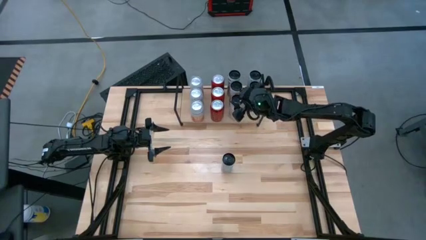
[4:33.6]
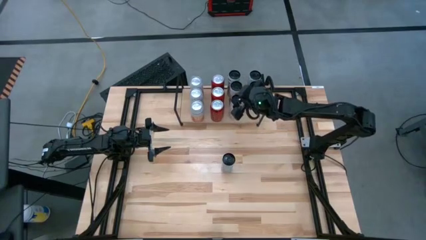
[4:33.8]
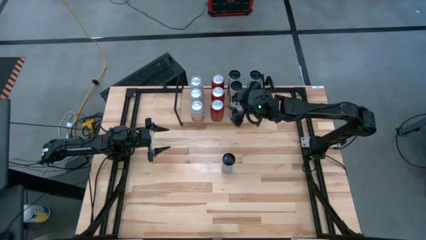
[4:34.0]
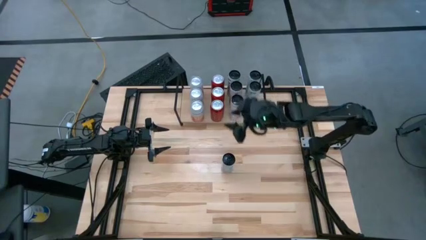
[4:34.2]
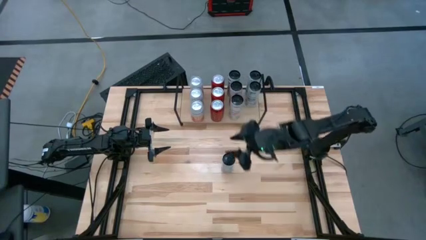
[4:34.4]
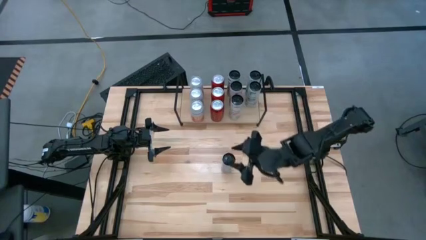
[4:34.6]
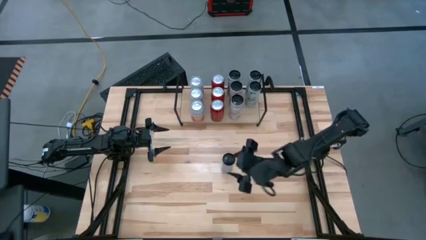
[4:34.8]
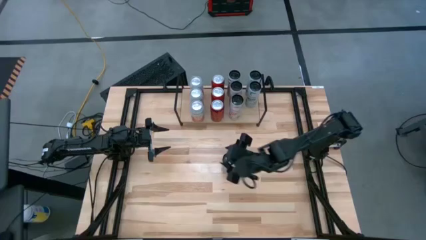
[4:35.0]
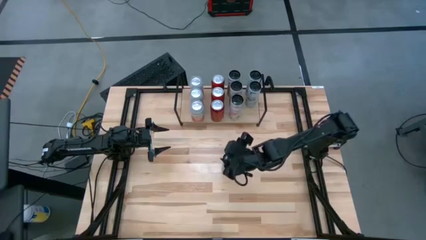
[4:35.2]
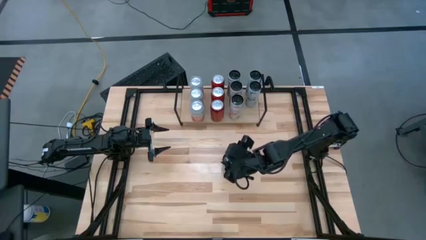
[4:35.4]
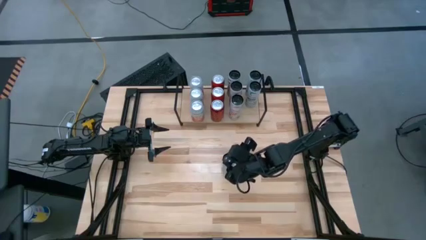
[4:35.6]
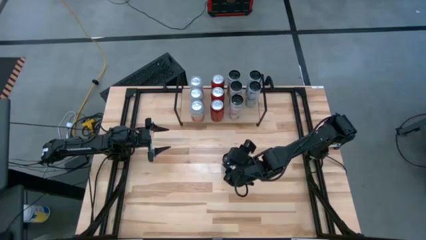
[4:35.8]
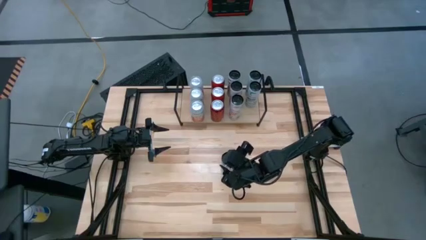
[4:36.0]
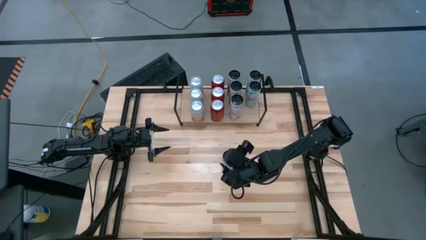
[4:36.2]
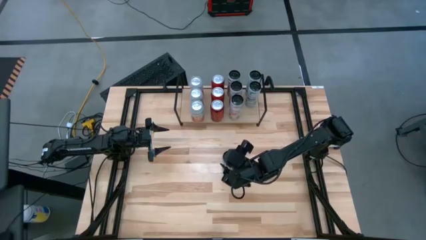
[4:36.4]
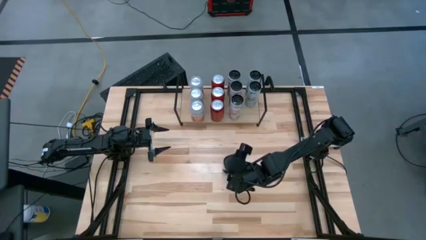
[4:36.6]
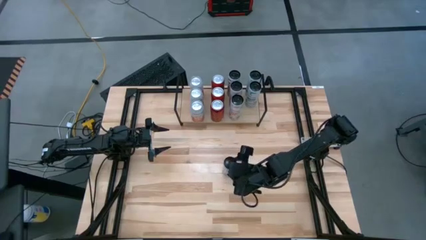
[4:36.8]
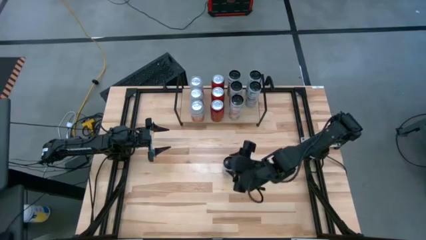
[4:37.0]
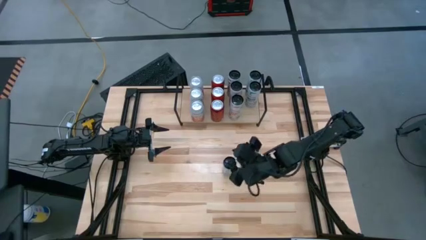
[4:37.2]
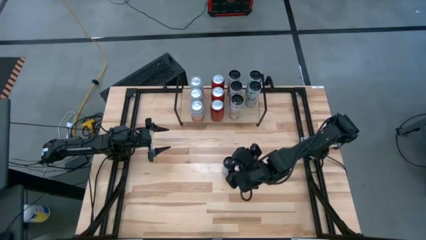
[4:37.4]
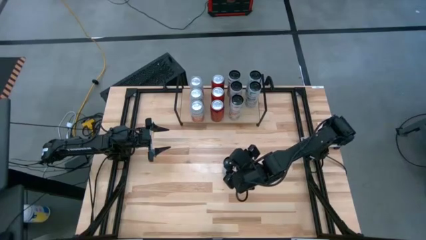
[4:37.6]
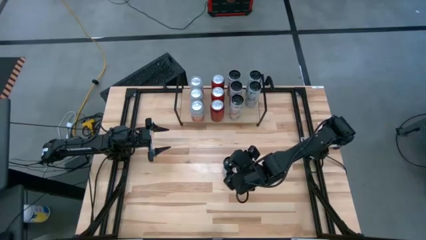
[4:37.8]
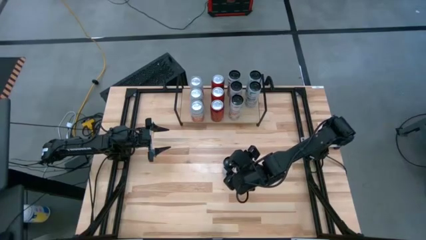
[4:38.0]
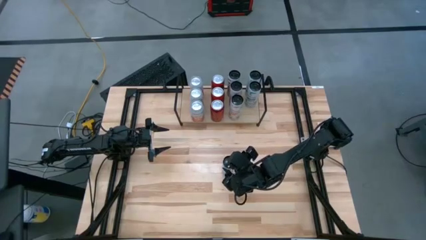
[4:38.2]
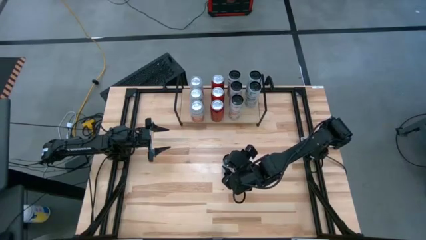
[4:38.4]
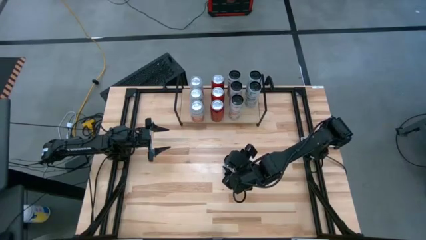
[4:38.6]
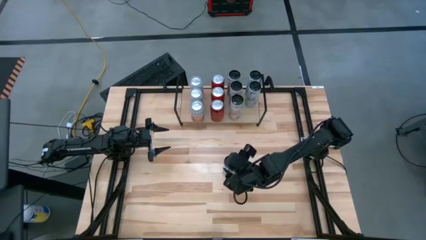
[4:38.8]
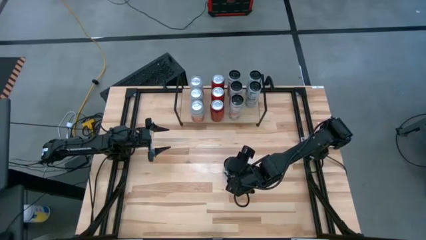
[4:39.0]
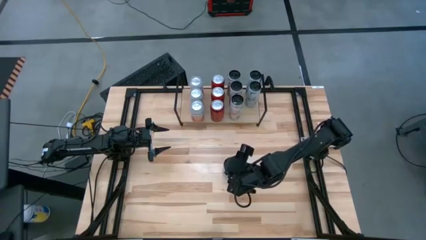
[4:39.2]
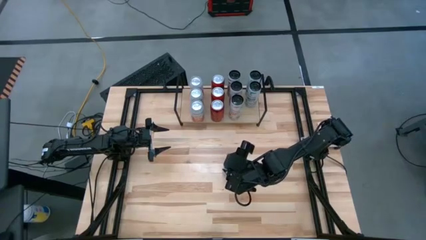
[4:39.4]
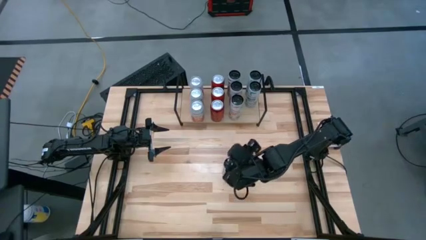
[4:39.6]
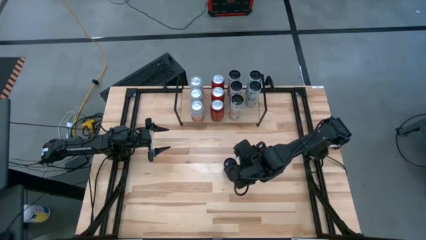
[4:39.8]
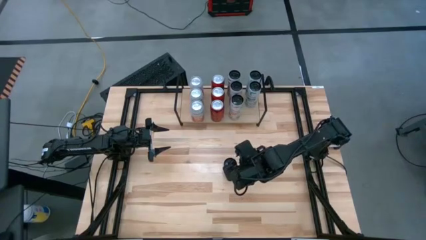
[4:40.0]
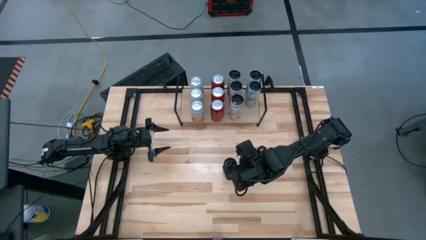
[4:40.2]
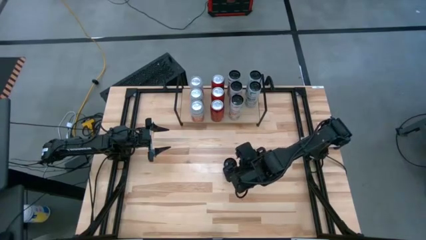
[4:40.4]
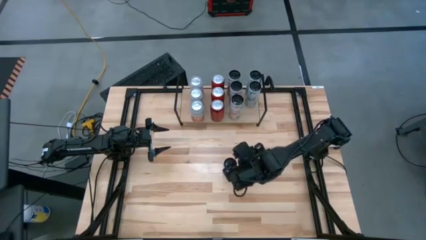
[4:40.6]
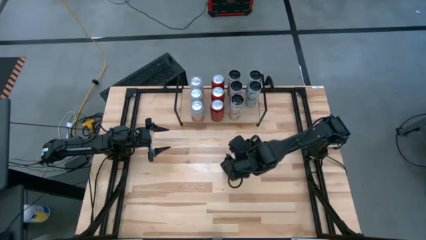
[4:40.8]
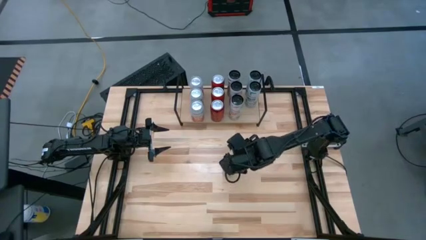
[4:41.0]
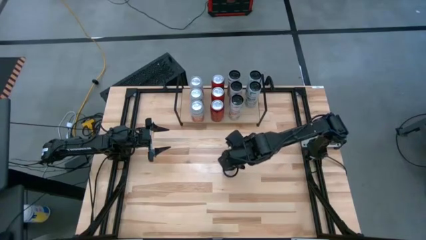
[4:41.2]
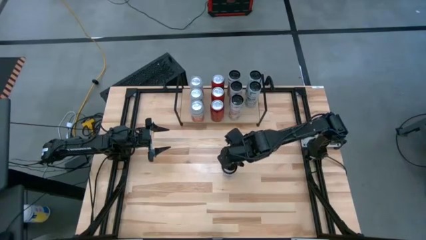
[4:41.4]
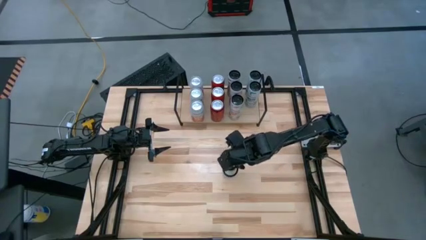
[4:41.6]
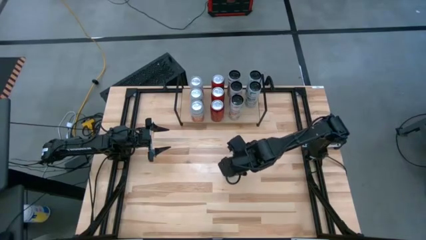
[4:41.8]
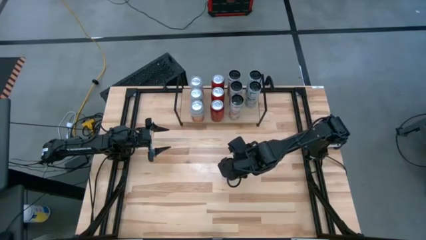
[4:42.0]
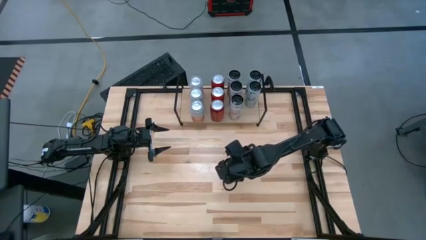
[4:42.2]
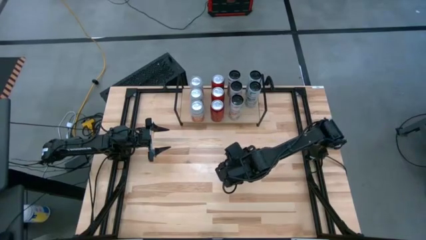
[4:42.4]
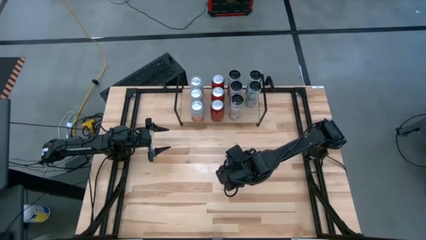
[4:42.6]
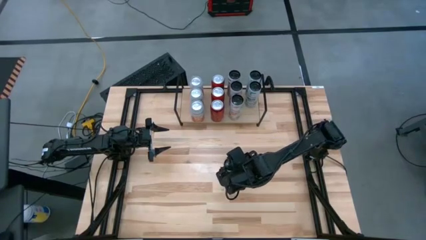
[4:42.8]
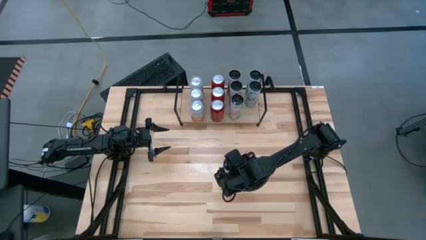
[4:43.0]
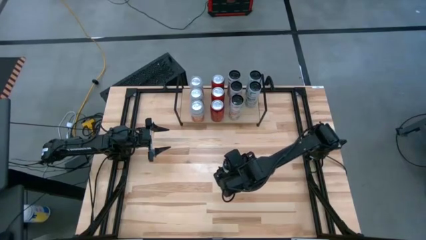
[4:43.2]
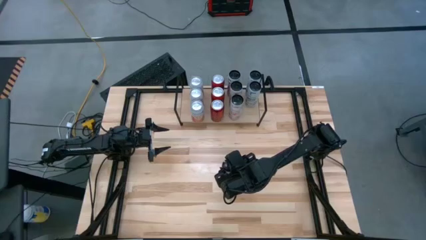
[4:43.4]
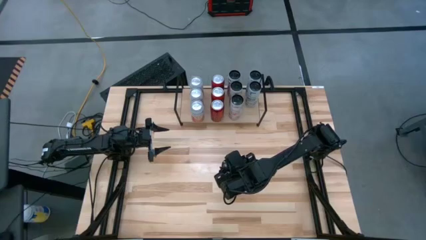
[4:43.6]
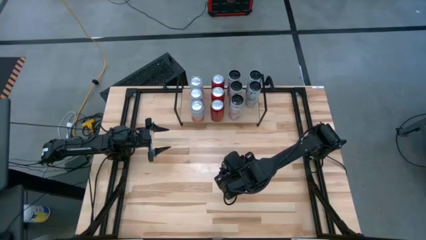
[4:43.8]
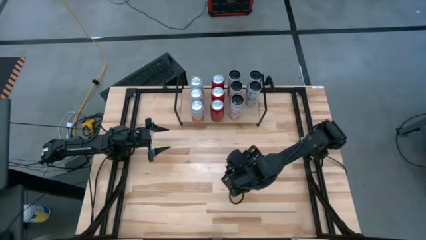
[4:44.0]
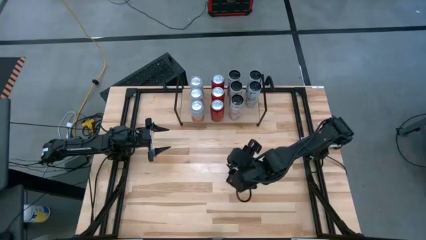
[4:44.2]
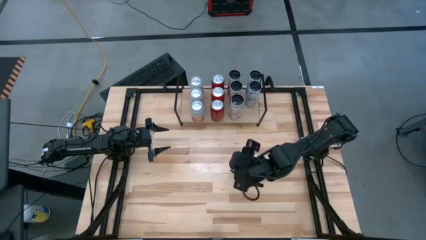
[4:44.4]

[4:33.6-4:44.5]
Task: Place canned beverage on shelf
Put the white blue soda can on the shelf aligned with the other white blue soda cans

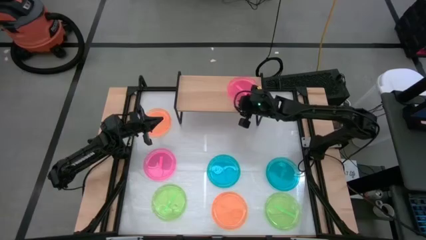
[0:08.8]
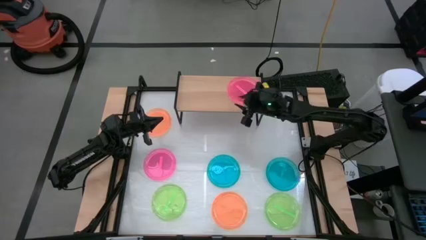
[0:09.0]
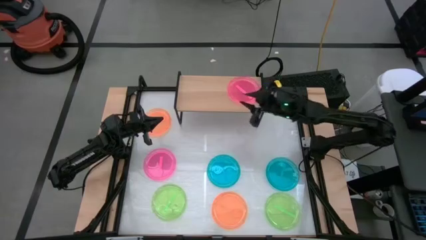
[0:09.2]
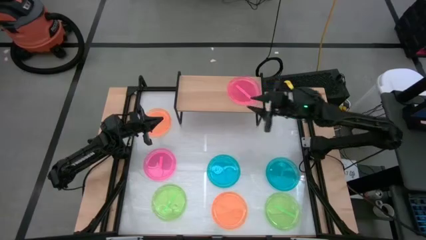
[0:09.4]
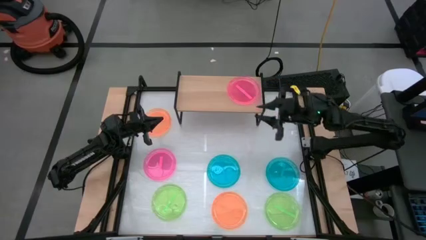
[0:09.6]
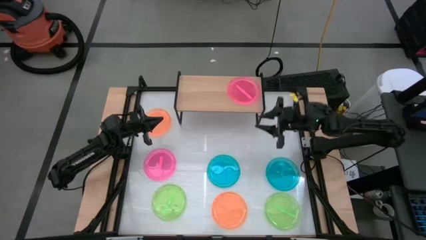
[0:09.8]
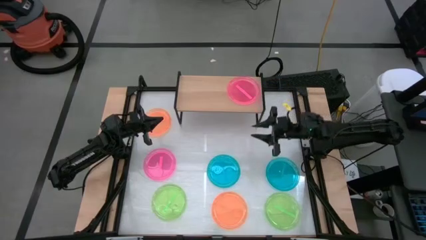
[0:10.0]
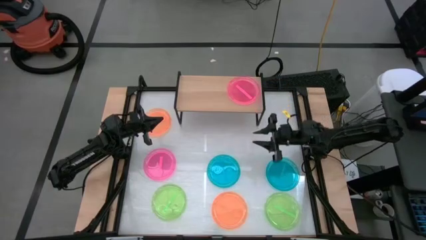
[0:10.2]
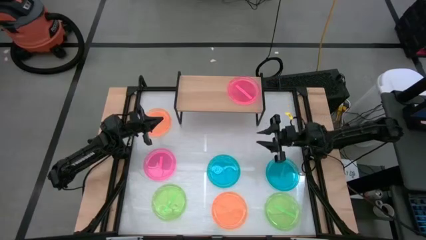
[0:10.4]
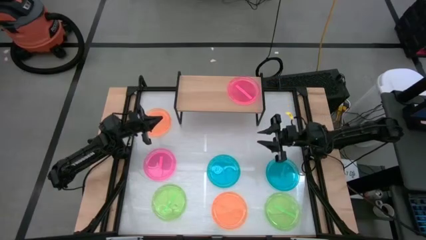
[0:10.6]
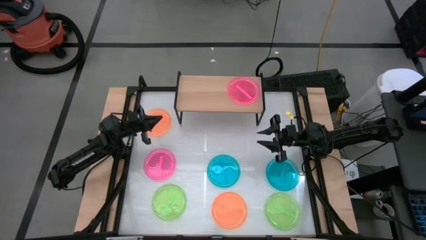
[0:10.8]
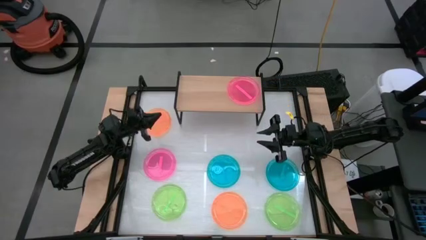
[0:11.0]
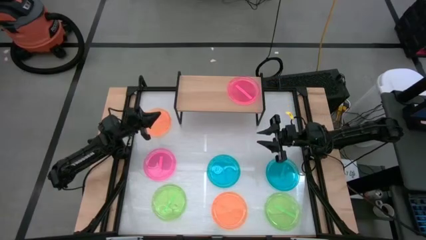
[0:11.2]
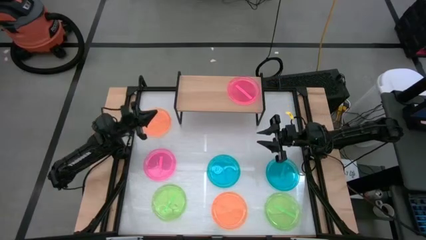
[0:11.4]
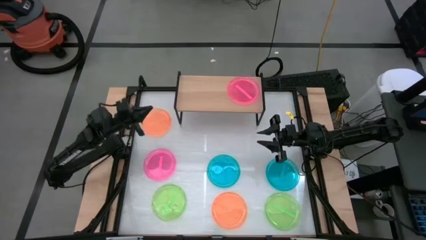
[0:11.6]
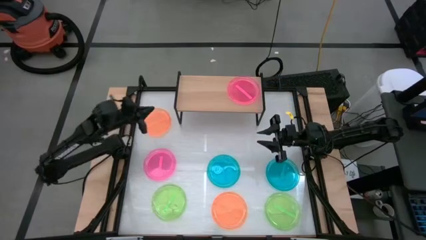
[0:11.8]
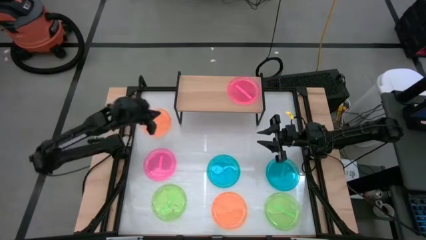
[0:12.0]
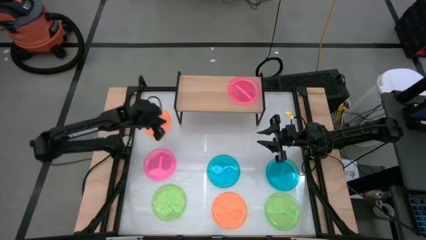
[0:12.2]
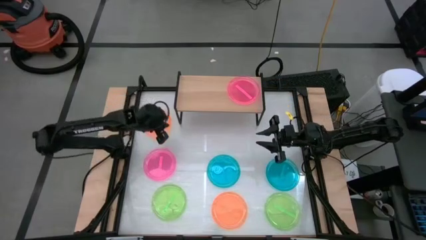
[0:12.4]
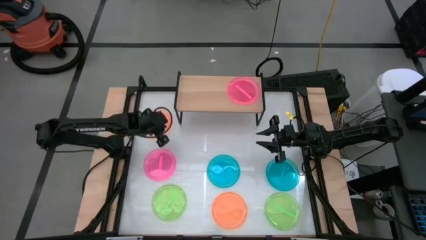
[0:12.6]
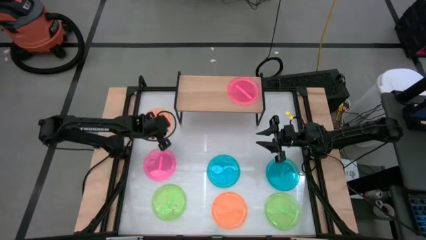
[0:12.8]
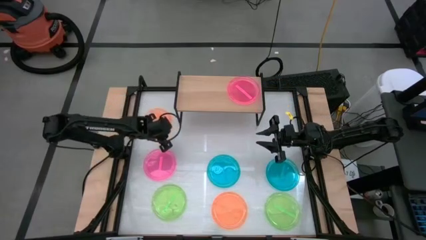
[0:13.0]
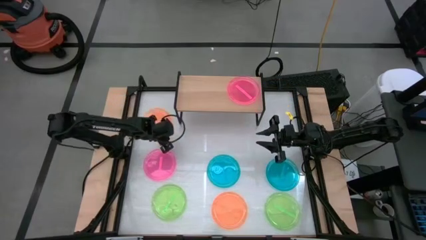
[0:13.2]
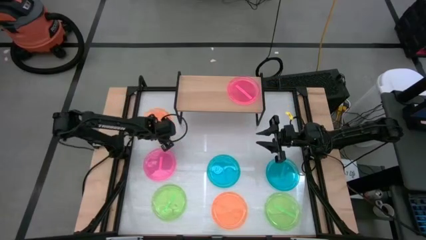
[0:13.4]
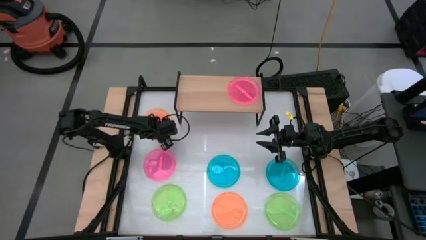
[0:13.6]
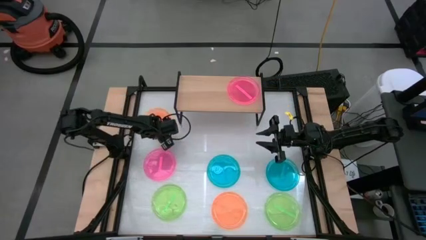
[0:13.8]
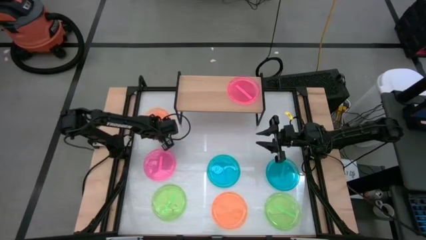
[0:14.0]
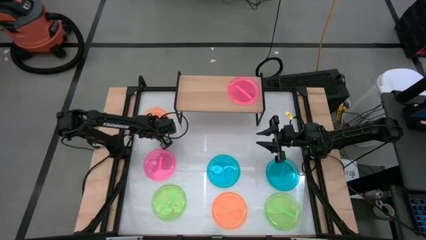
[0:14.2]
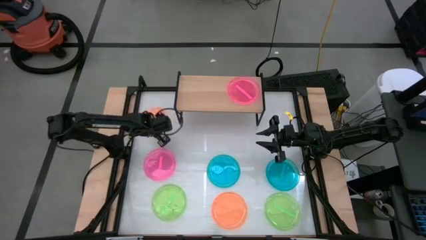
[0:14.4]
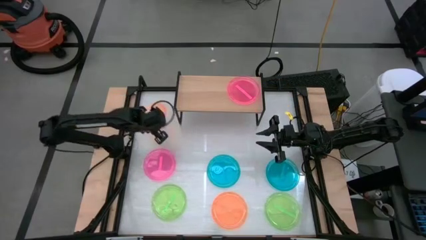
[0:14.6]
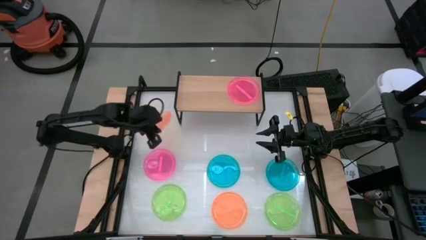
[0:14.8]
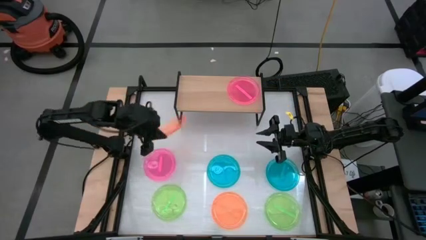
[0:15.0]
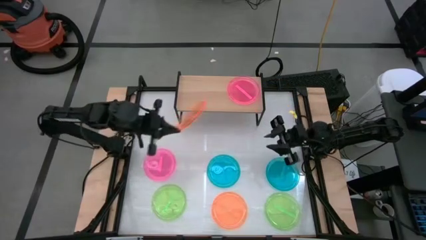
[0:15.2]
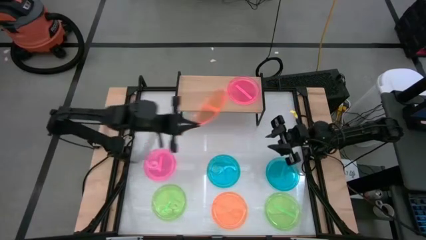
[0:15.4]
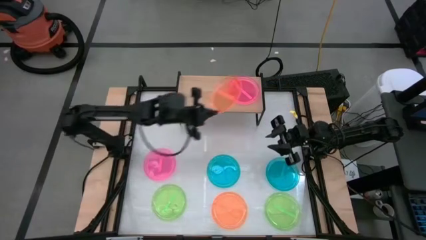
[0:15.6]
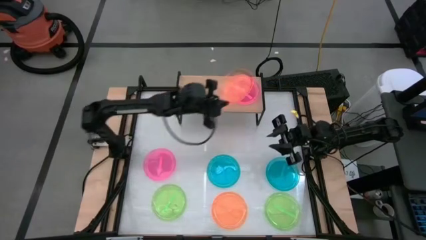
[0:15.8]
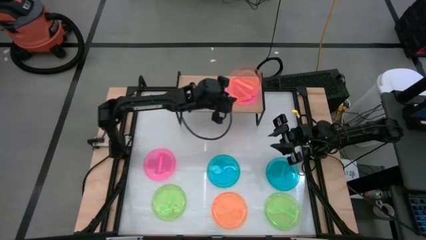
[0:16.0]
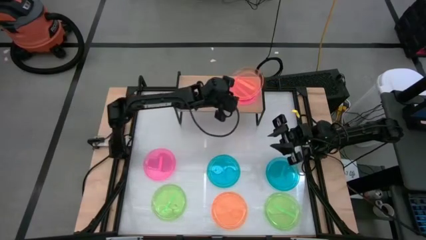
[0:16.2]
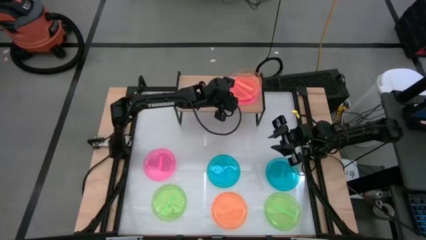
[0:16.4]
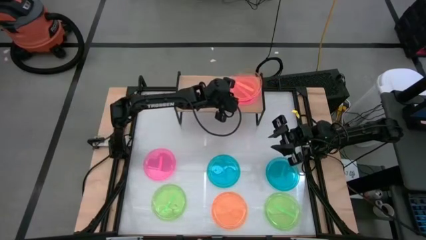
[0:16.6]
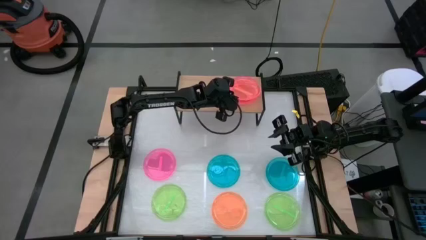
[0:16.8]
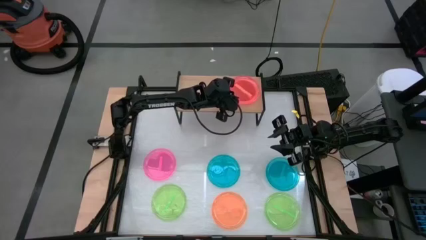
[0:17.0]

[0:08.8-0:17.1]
Task: Place and stack plates onto a shelf
Stack the top orange plate on top of the pink plate on the shelf
